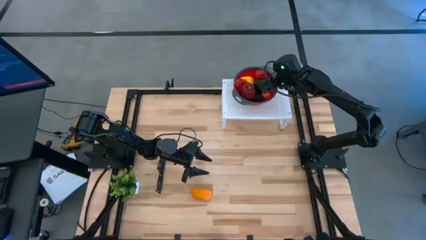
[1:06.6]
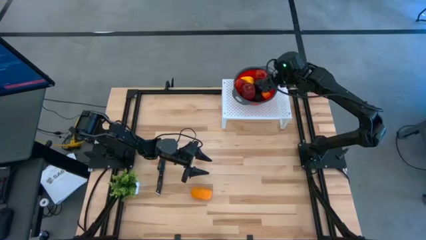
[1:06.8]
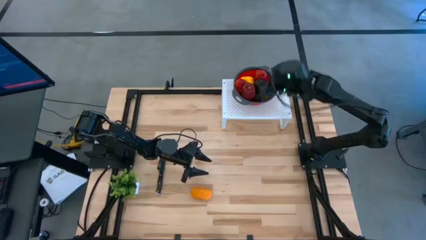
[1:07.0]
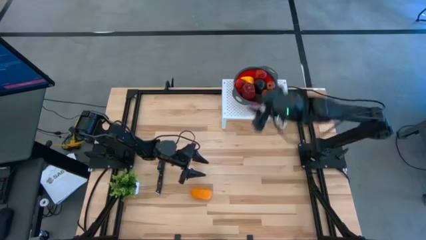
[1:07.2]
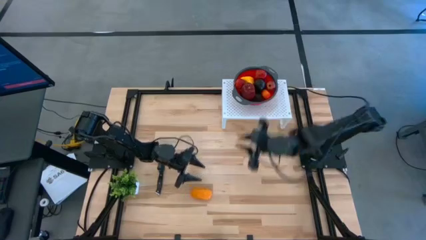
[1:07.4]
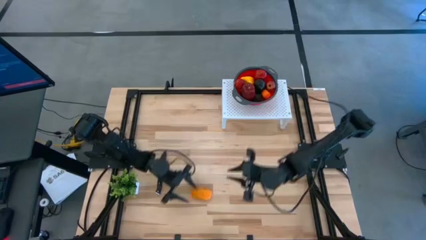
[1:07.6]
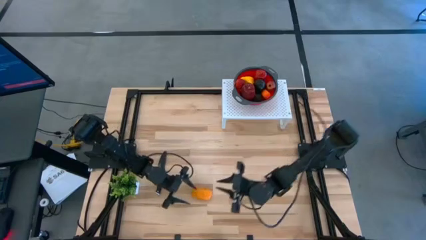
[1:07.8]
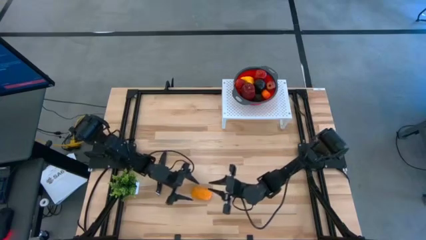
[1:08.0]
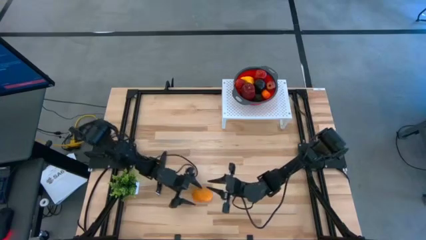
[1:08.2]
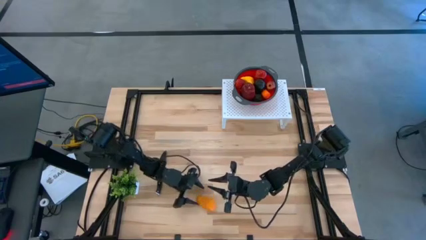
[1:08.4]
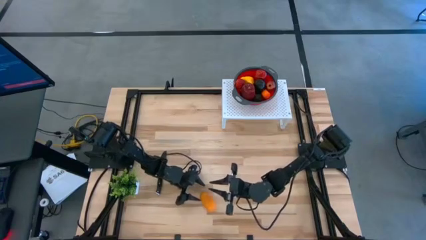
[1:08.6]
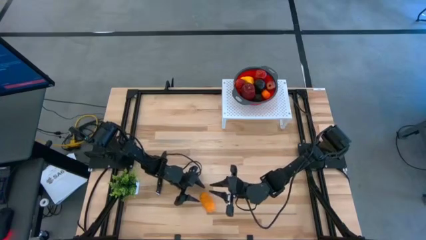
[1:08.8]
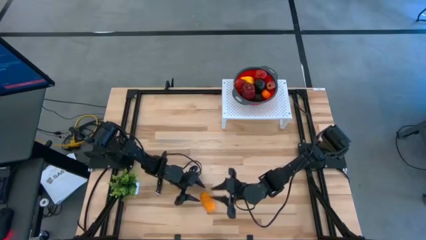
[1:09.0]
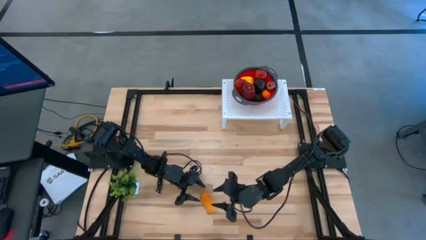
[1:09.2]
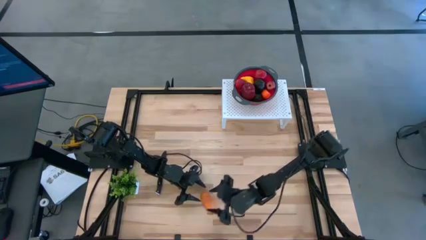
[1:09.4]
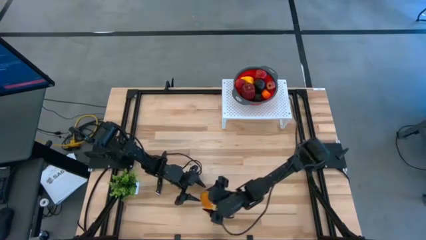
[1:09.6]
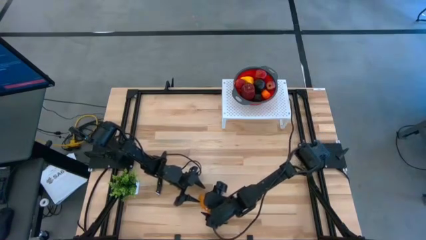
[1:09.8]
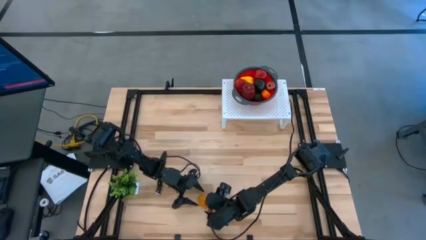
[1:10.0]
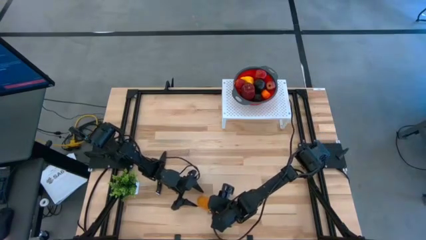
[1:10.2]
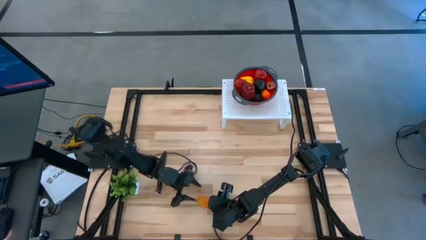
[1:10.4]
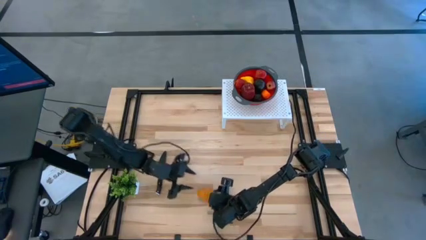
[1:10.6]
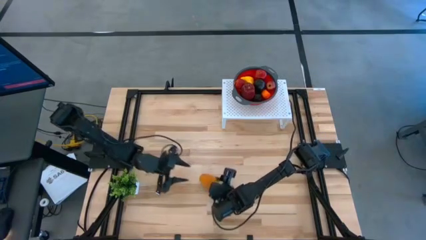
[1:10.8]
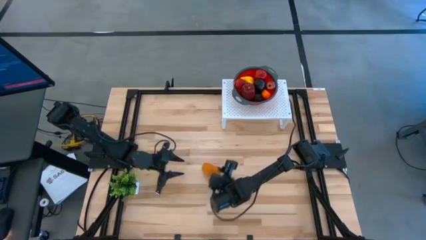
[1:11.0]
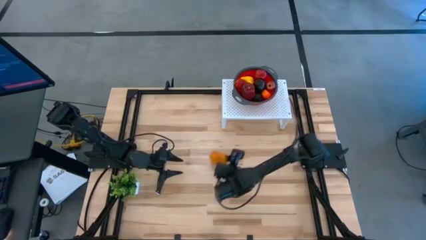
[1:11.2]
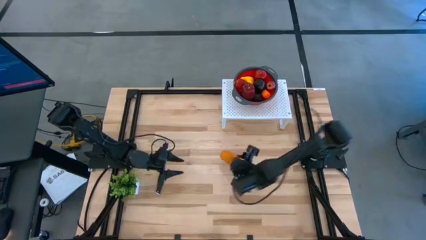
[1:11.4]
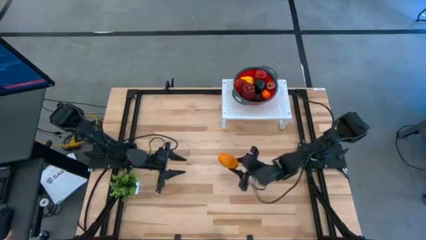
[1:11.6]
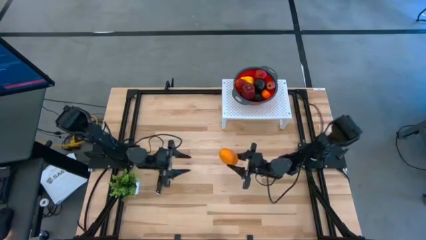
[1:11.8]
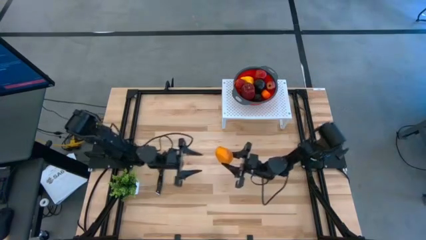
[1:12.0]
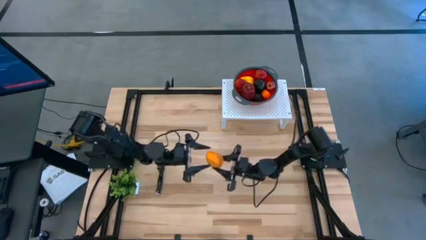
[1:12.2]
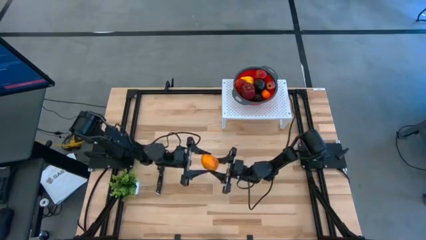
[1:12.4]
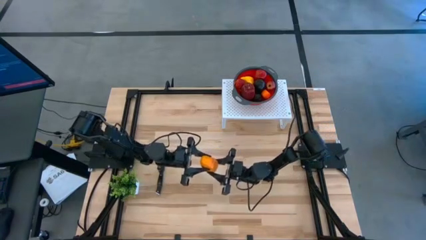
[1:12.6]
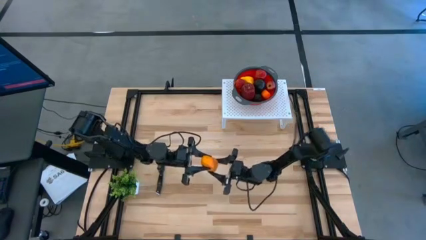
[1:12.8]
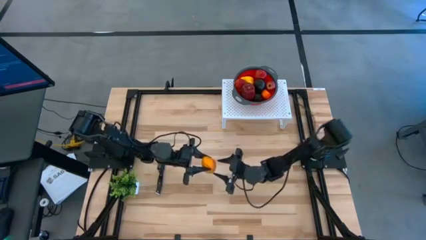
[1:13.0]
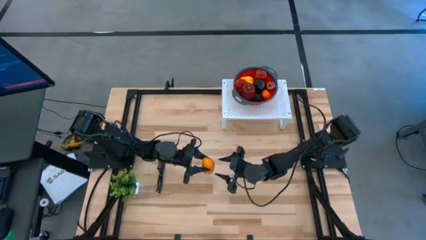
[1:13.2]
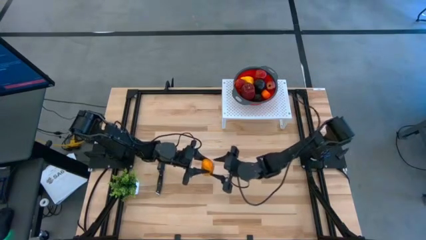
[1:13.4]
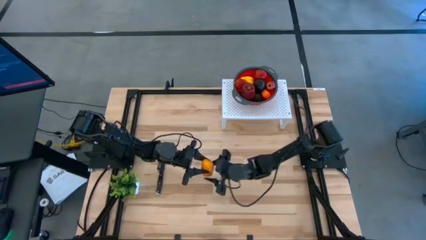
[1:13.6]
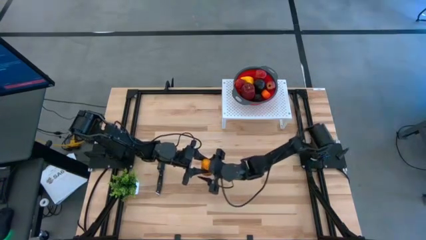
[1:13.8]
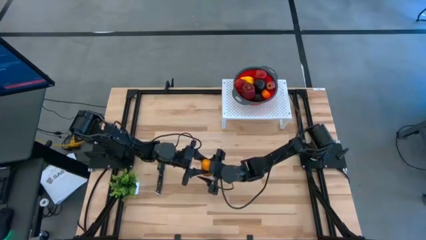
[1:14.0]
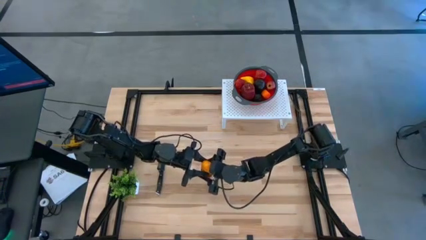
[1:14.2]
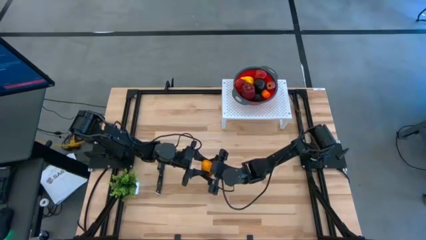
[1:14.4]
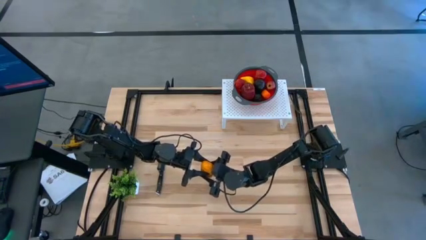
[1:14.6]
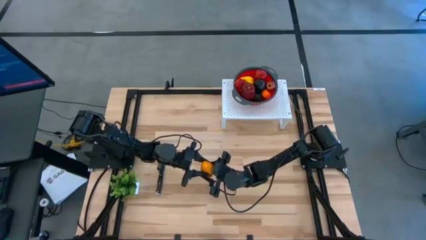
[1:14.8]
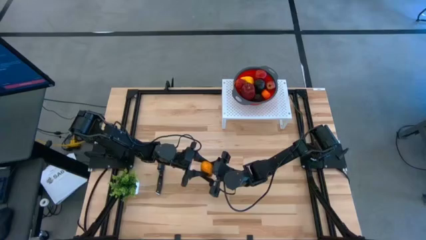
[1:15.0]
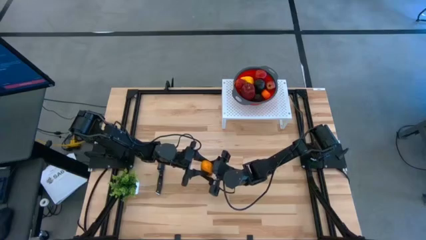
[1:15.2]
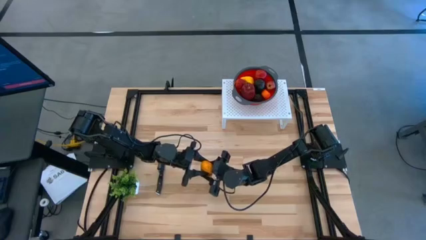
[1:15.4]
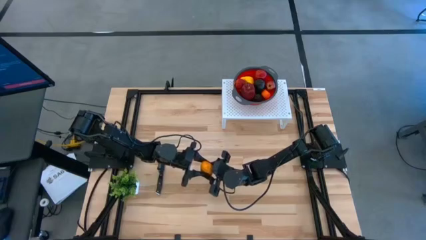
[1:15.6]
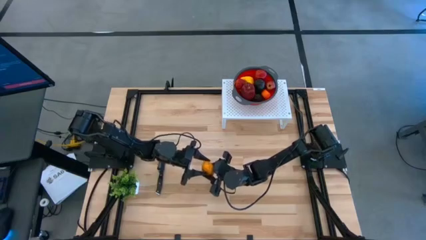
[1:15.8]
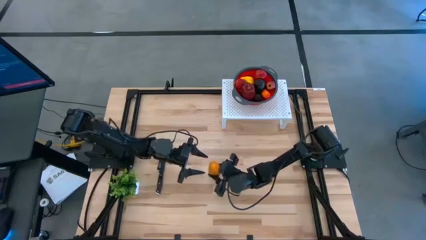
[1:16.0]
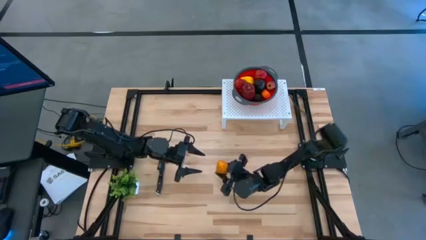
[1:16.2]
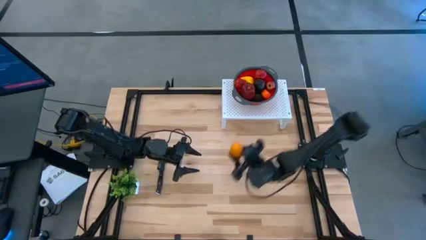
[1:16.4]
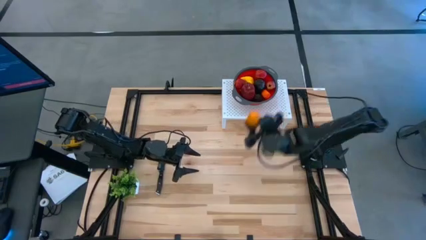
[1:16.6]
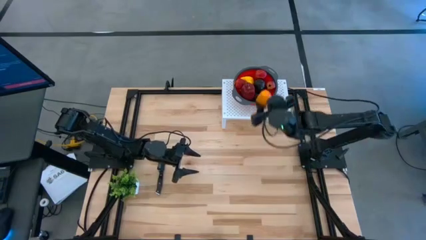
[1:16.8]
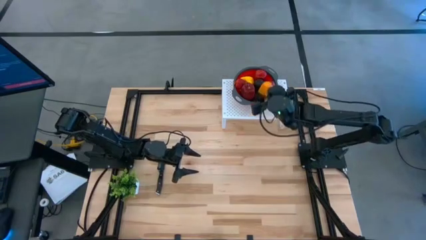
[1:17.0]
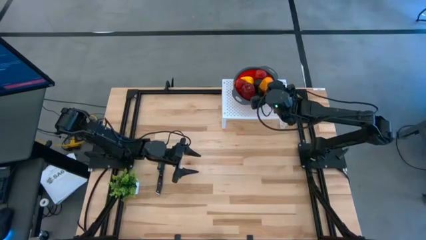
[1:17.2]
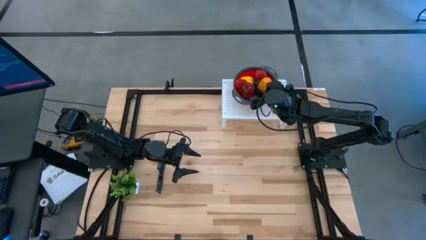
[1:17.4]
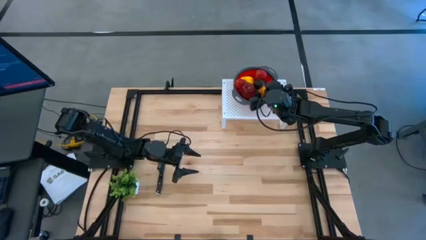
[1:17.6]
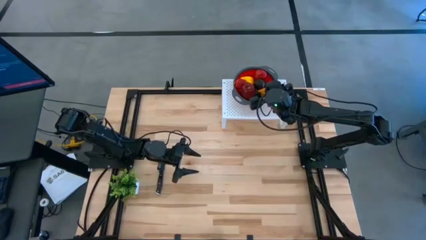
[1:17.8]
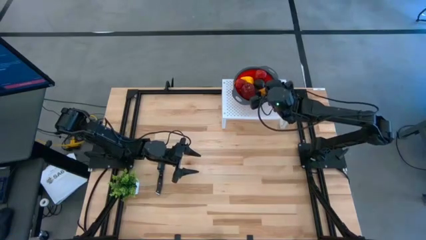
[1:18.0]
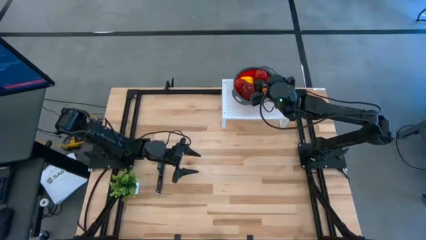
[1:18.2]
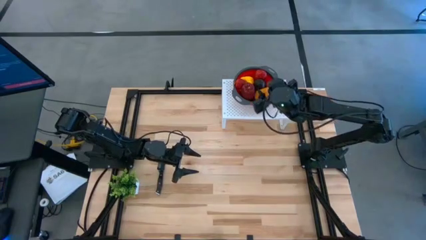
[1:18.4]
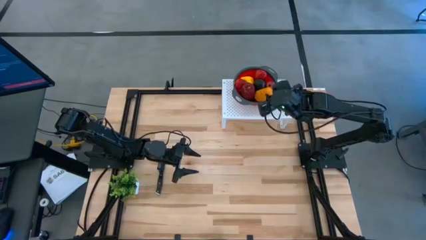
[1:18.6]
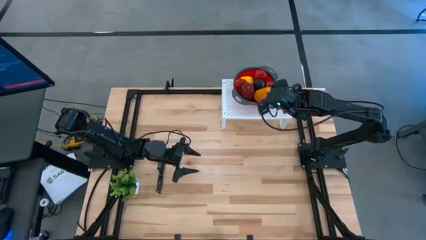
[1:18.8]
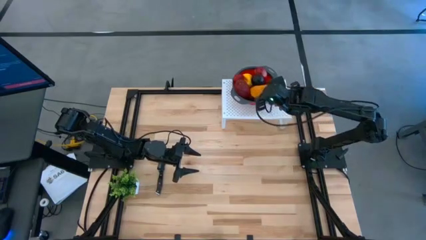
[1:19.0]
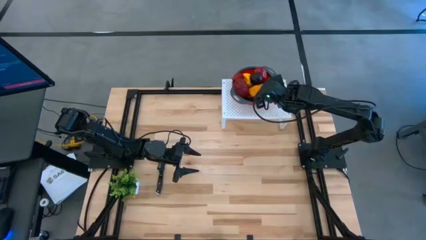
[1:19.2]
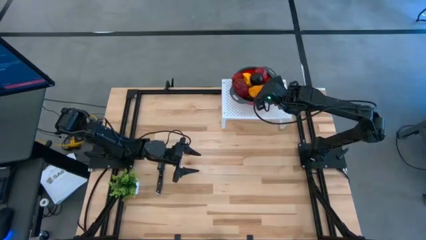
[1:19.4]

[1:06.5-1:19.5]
Task: Pick & Place Fruit
Put the yellow mango into the orange strainer bowl on the shelf

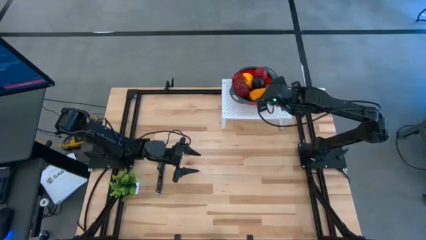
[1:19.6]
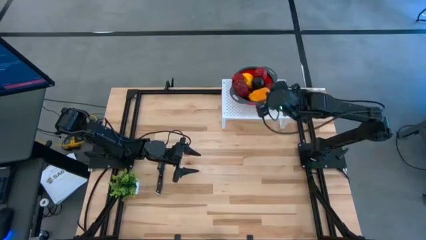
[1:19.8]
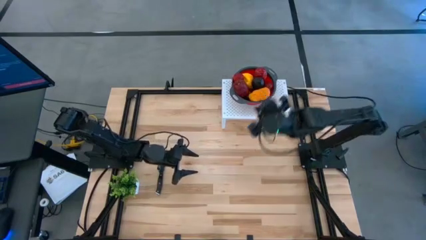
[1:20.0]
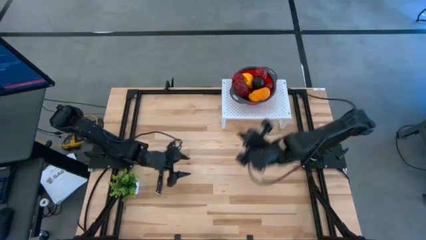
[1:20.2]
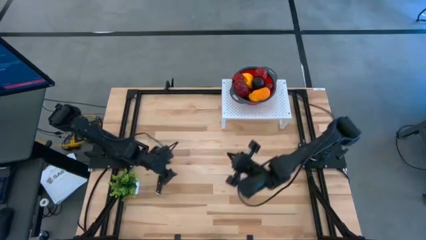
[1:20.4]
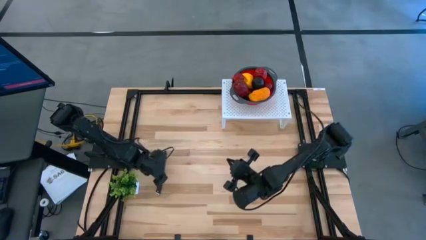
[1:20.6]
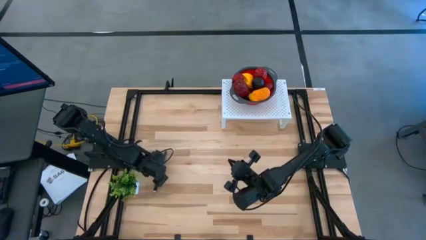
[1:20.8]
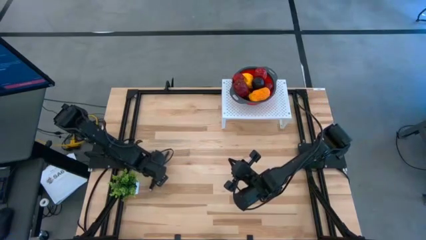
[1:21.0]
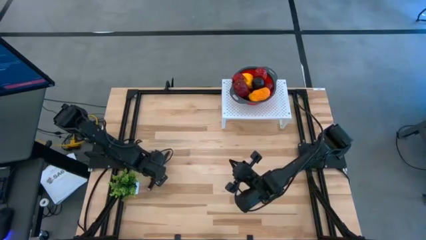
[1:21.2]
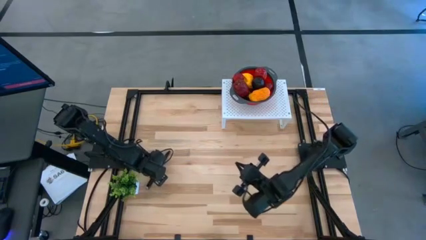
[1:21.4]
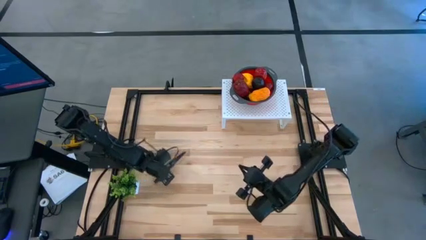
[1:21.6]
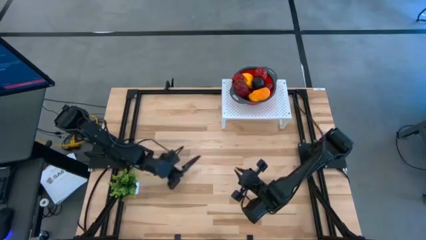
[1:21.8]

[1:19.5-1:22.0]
Put the black knife on the shelf

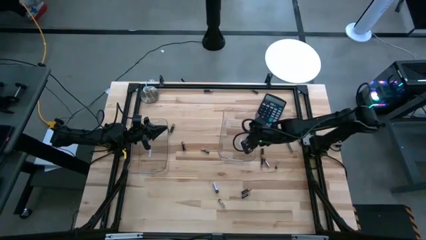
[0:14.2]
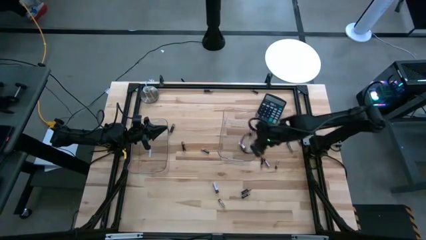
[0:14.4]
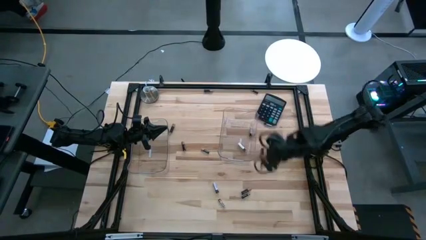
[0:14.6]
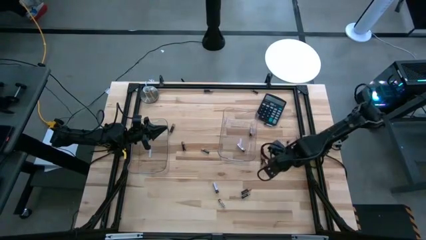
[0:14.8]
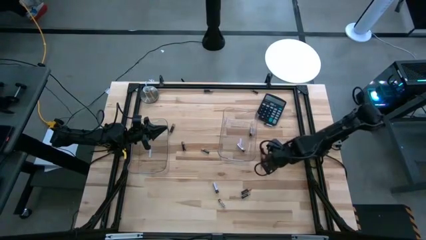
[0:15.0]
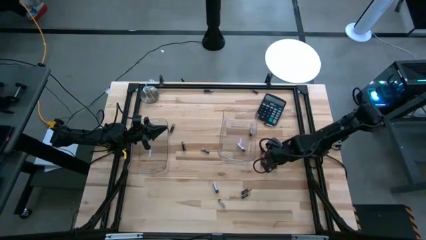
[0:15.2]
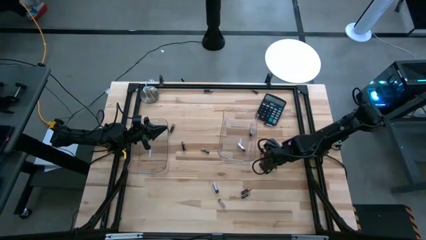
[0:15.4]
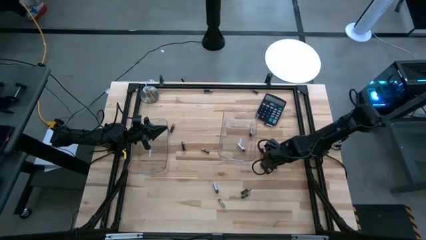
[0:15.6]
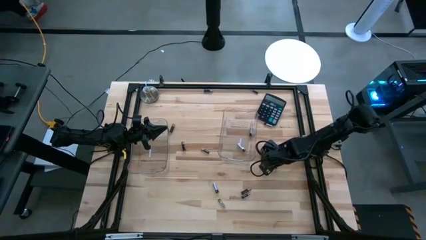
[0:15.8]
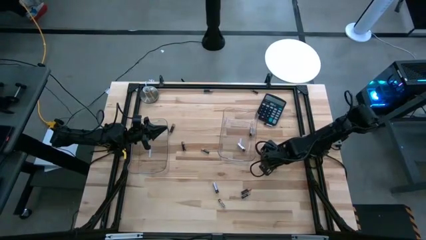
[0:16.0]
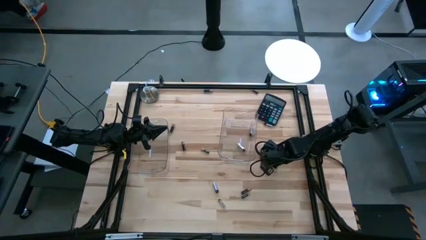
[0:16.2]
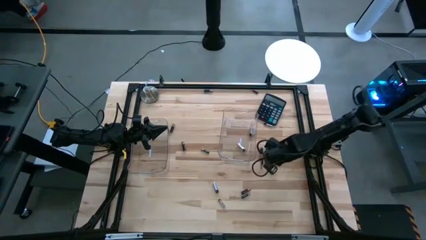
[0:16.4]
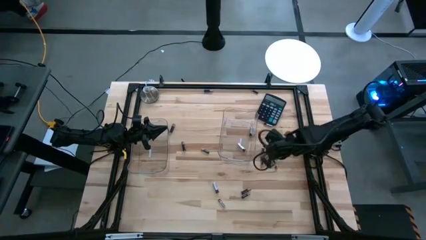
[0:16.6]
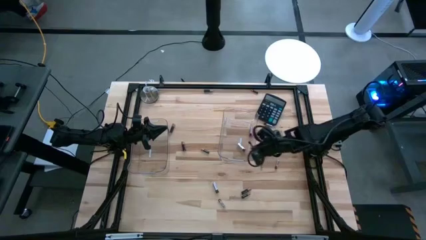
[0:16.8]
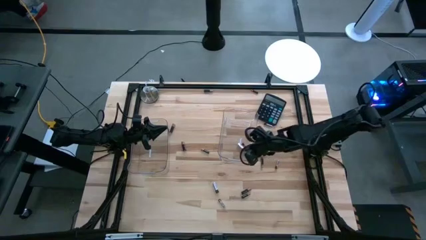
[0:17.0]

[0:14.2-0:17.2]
Task: Sort batteries
Put the silver battery into the right transparent bin
